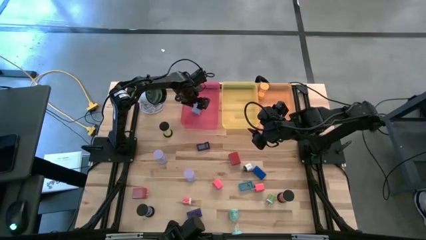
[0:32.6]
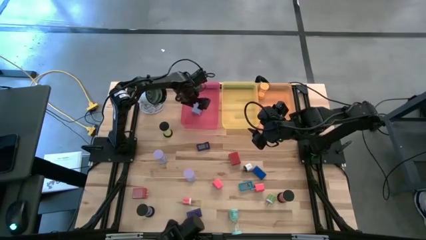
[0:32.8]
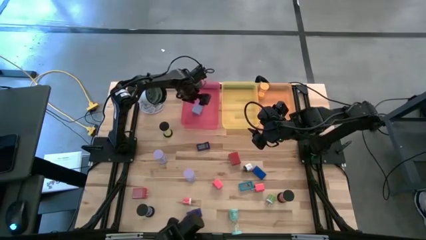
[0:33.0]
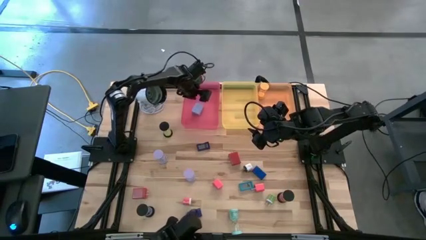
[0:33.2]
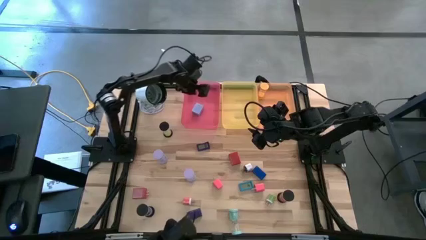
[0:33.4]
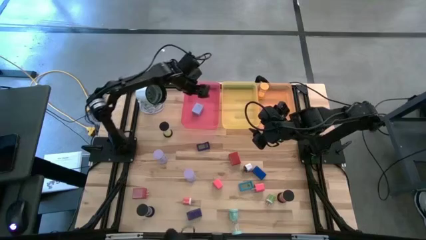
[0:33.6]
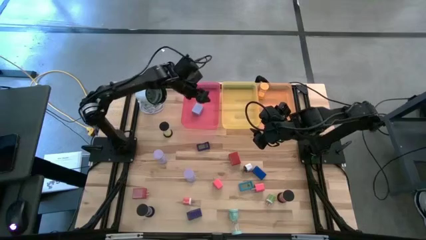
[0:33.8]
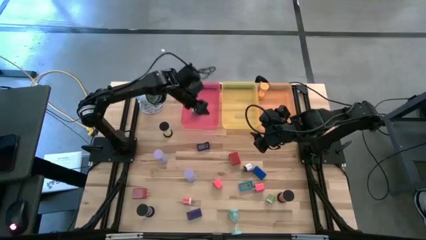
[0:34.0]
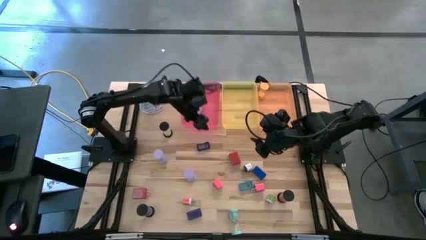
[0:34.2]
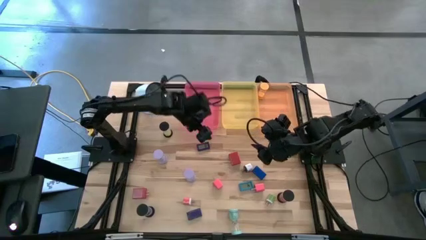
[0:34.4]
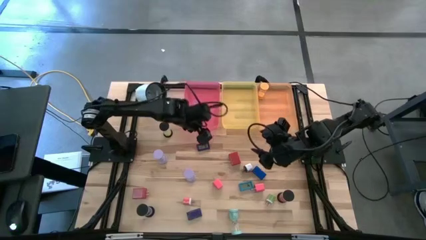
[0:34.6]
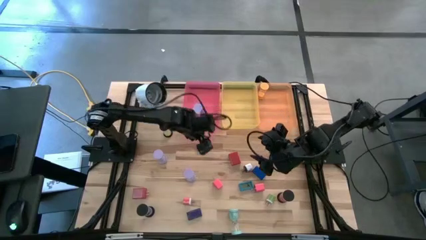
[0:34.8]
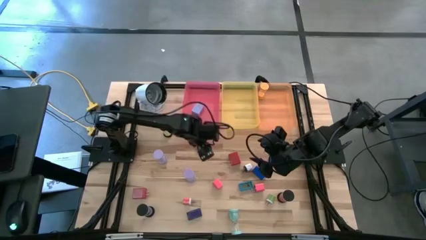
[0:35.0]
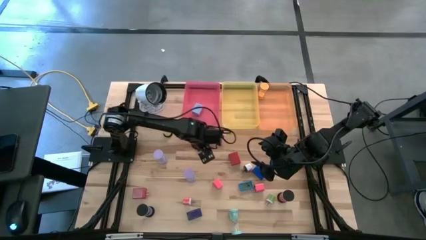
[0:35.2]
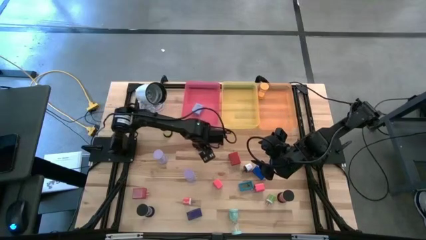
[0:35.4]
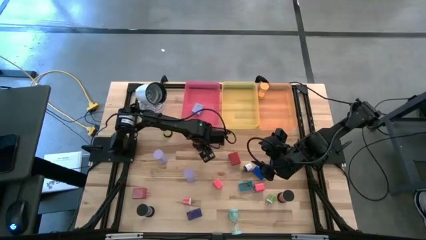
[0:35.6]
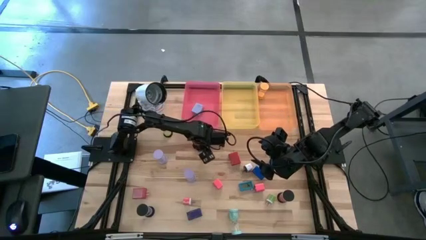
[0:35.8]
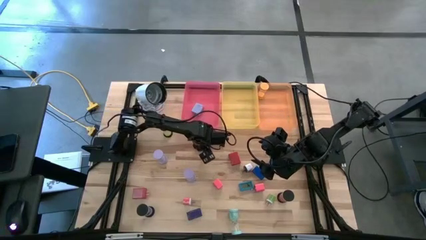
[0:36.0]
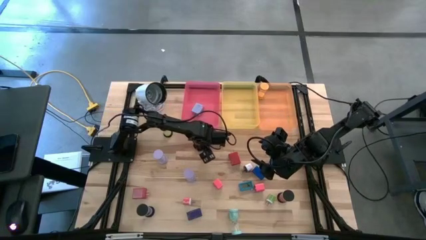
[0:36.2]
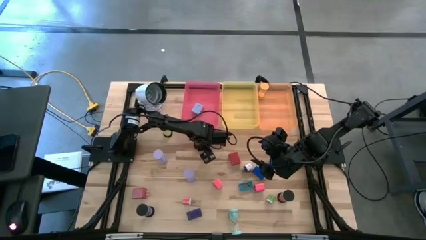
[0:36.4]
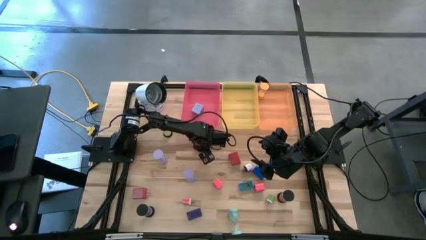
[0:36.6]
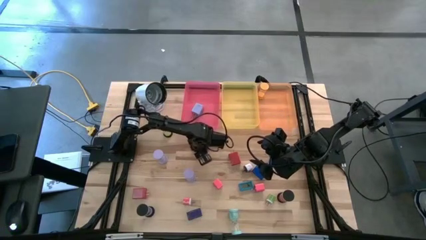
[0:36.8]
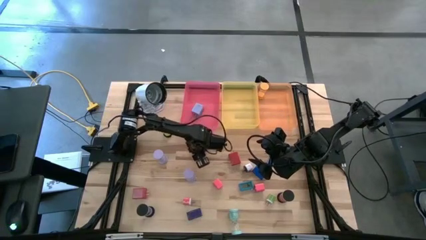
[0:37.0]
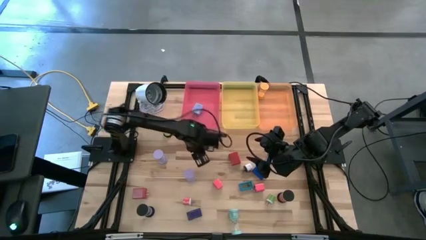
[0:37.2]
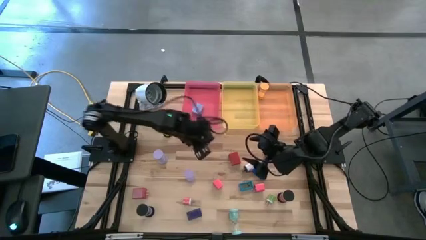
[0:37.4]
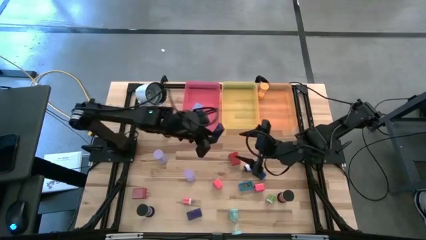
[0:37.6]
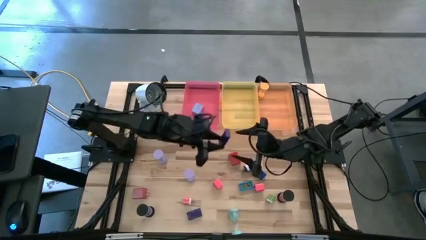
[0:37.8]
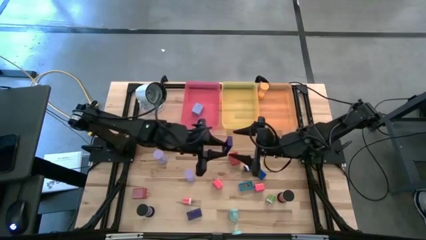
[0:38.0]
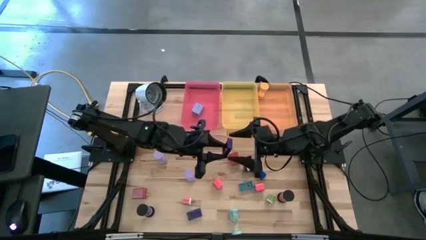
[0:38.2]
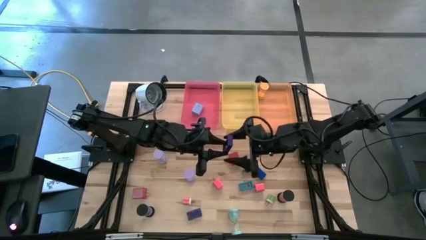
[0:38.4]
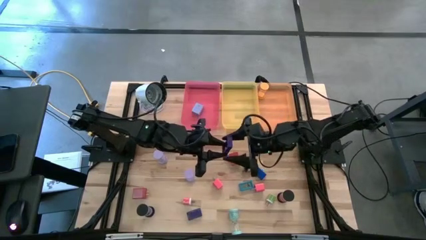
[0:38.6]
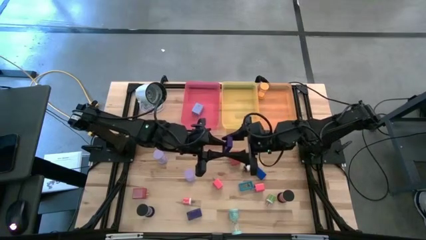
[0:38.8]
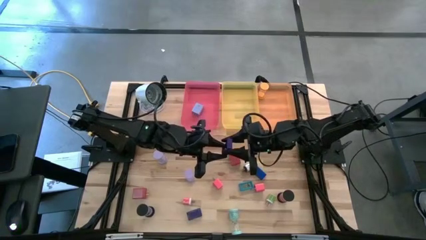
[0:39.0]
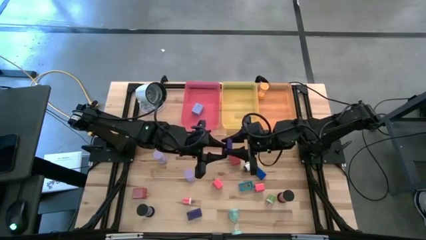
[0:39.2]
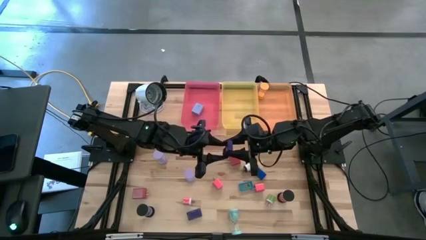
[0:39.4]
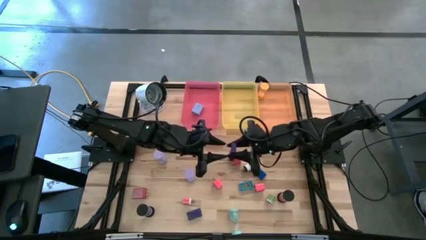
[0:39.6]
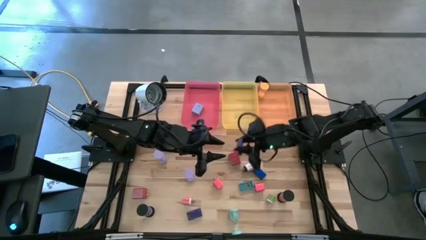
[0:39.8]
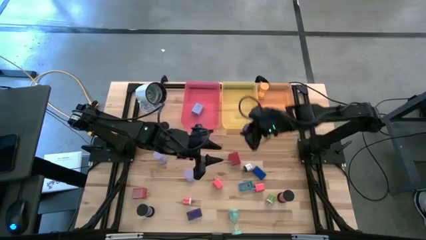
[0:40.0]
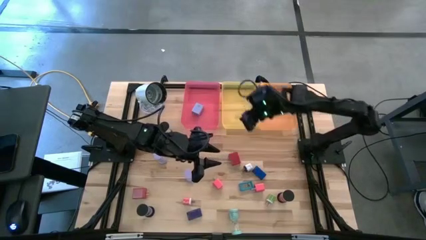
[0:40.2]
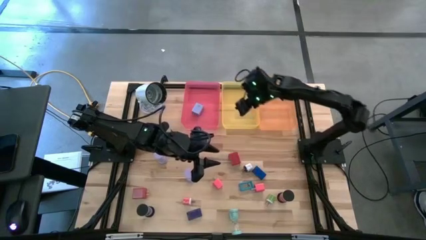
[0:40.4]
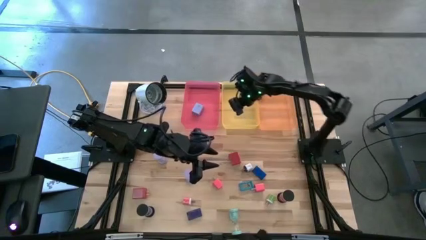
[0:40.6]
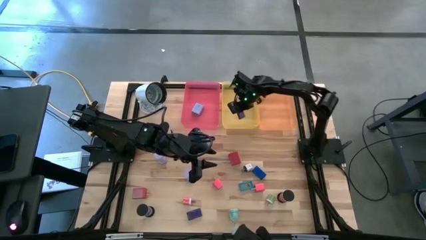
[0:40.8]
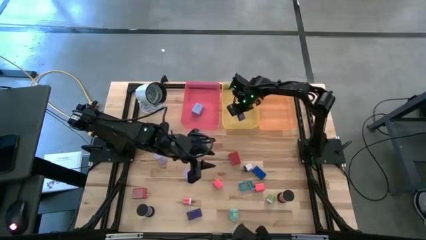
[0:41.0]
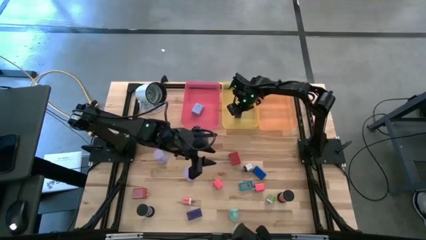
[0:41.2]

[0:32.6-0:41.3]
Task: Pick & Place Office items
Put the top purple digital clock into the yellow bin

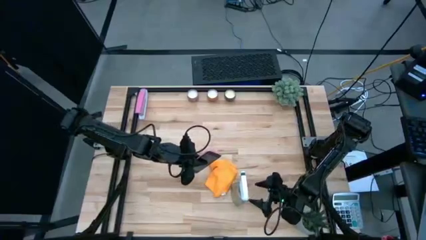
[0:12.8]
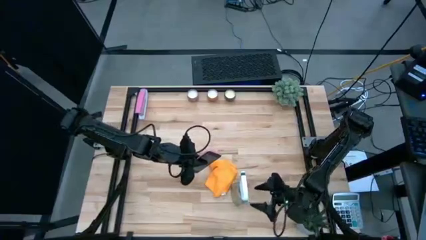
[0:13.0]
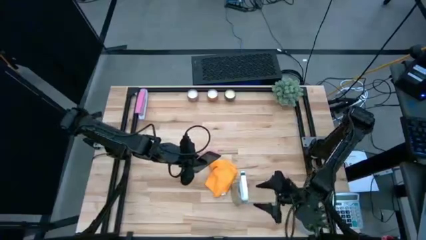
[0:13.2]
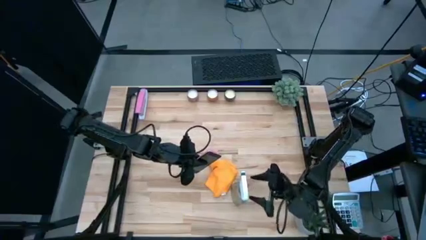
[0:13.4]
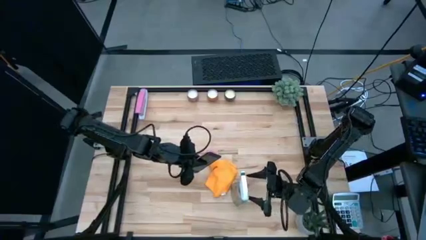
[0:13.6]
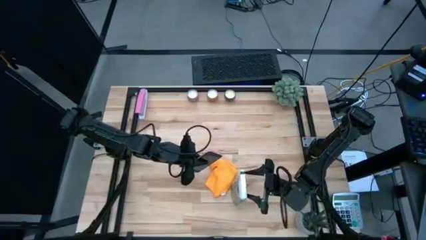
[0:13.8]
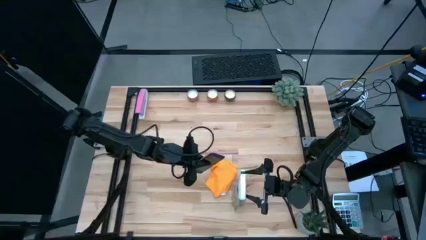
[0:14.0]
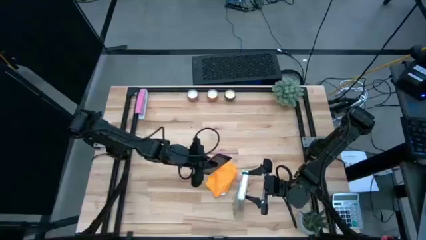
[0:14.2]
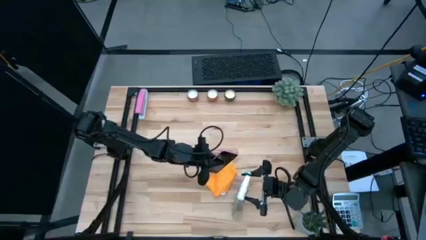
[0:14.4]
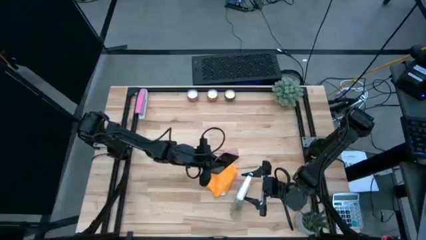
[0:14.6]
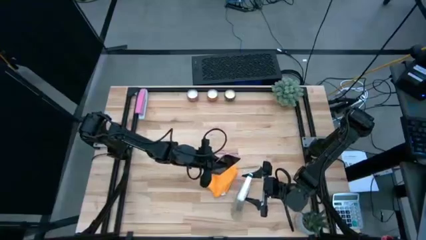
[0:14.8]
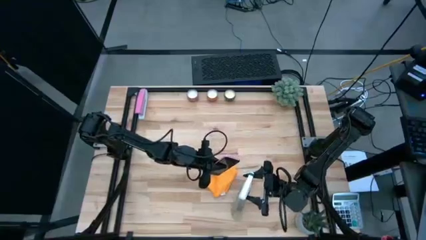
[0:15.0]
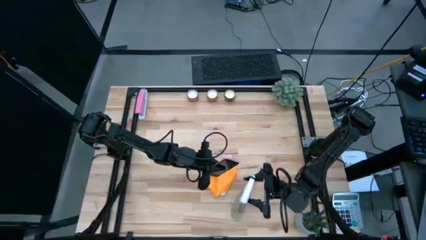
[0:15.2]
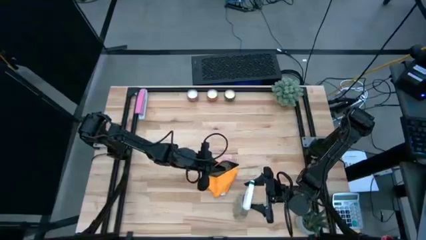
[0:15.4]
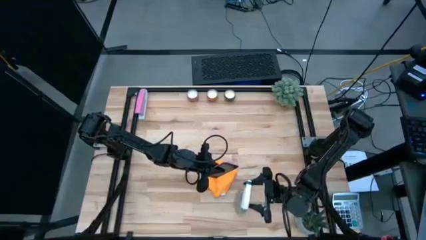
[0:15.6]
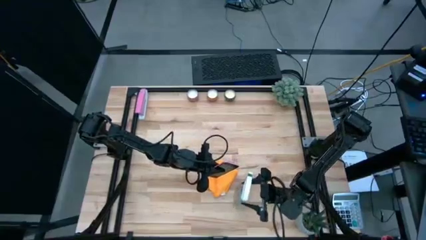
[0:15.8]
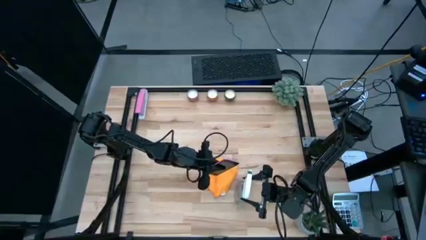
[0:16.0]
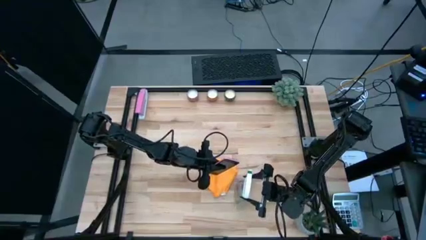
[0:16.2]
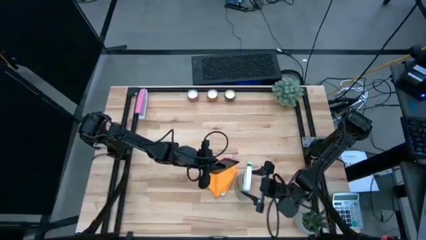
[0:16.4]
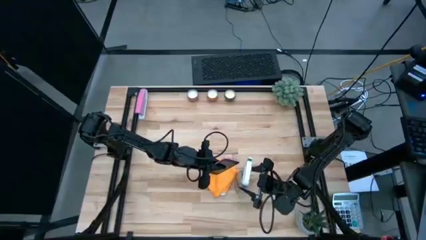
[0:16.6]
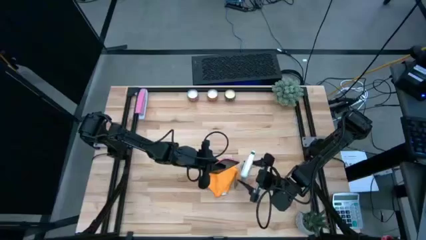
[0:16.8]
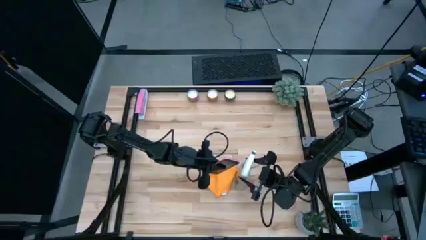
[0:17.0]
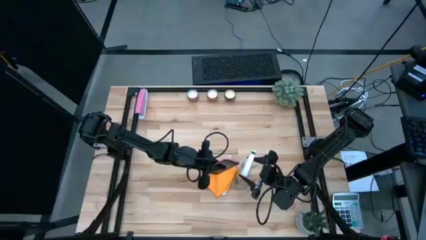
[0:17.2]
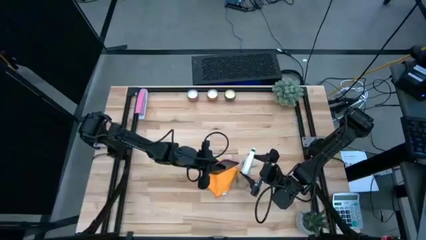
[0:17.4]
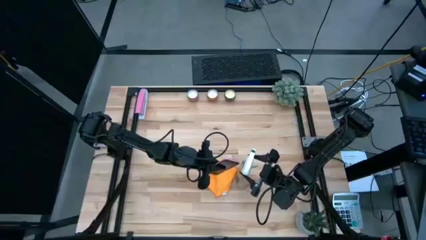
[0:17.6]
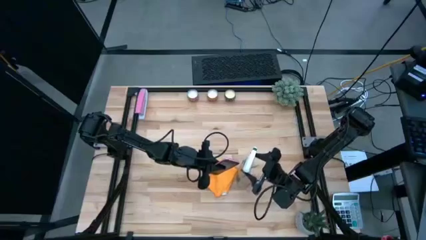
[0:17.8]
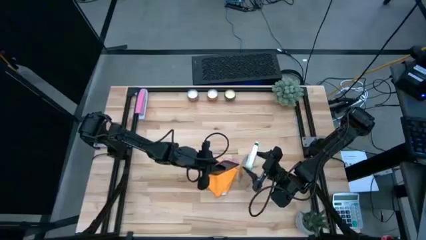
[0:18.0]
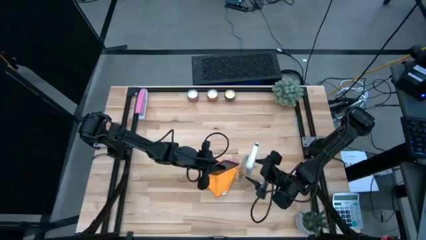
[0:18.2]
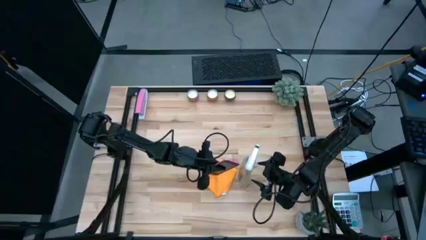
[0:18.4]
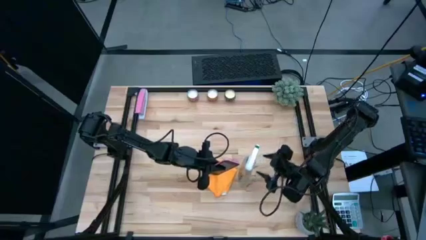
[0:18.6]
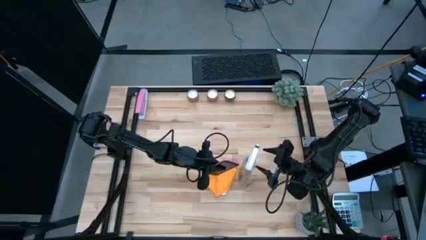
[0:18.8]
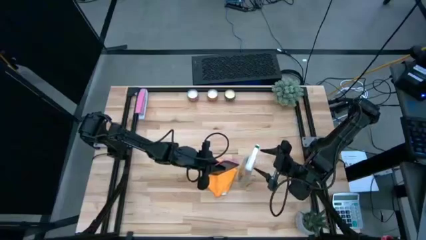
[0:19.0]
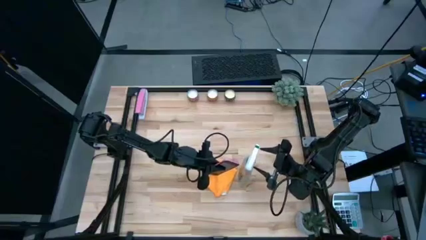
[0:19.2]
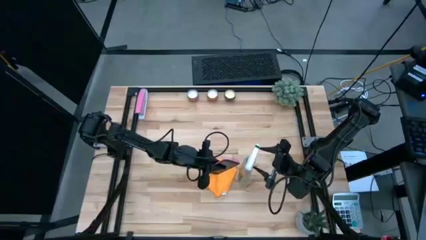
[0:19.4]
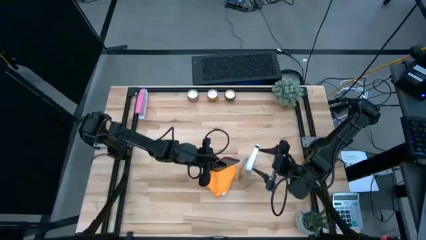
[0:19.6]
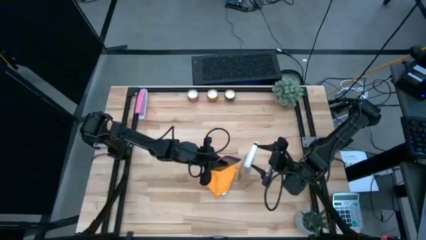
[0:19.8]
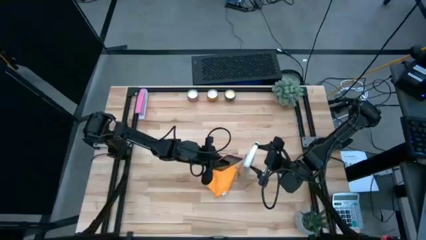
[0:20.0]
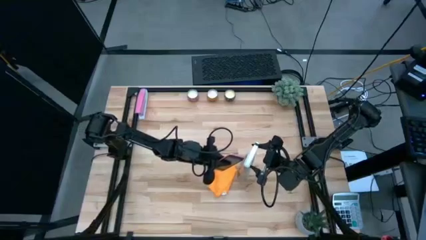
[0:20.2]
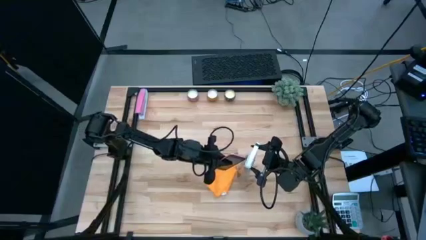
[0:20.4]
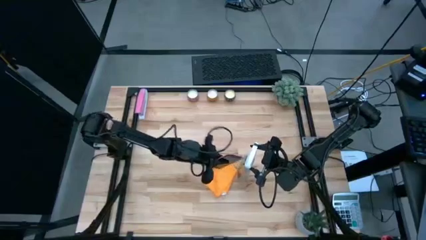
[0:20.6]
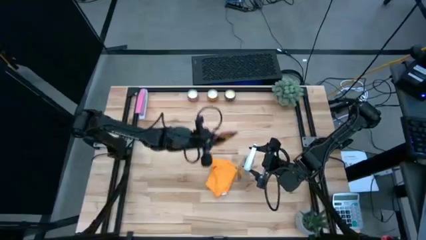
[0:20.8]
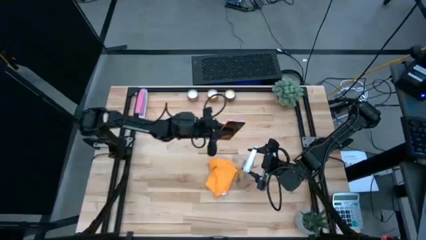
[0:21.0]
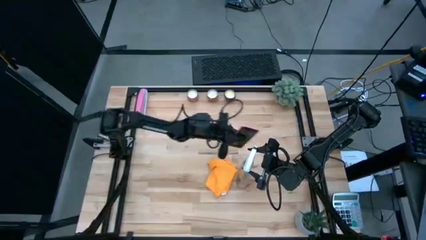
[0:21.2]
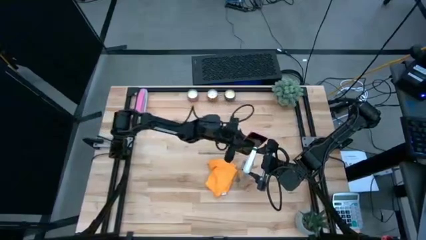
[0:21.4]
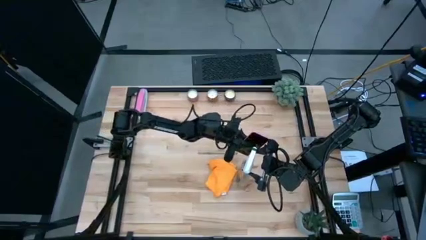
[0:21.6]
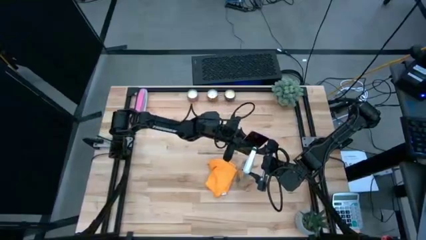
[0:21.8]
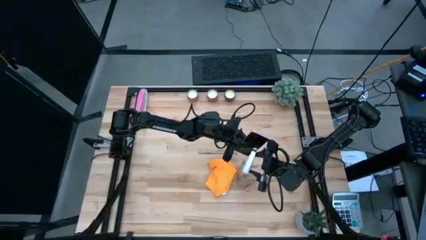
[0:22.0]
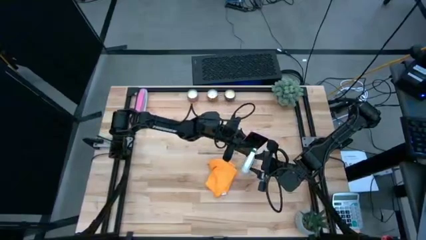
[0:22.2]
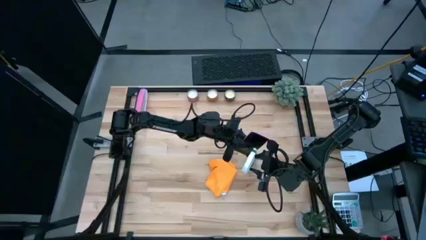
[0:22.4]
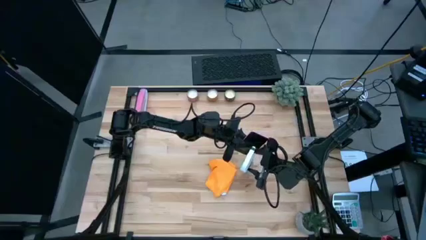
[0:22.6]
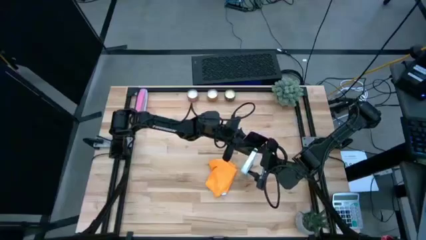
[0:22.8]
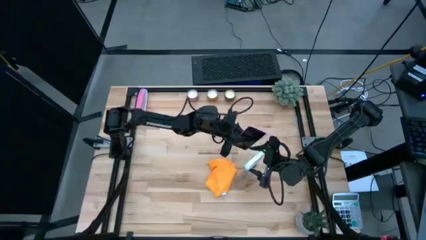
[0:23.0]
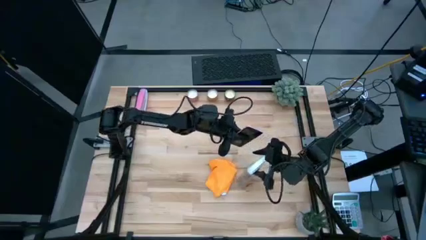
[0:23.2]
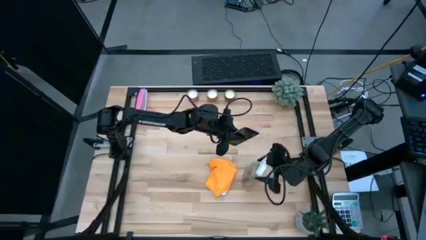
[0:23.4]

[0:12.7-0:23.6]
Task: Apply microfiber cloth
Spray the front side of the pink cellphone using the spray bottle
